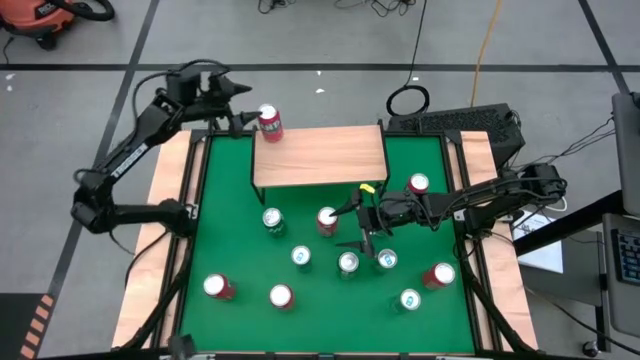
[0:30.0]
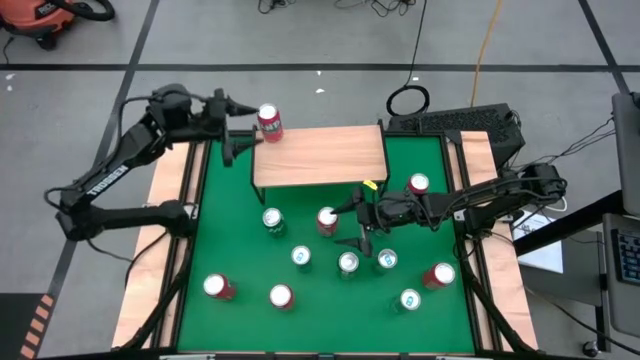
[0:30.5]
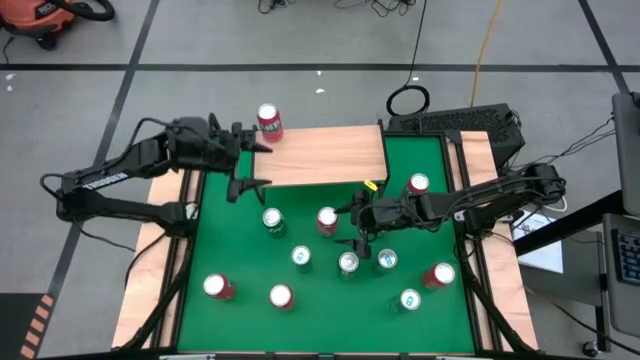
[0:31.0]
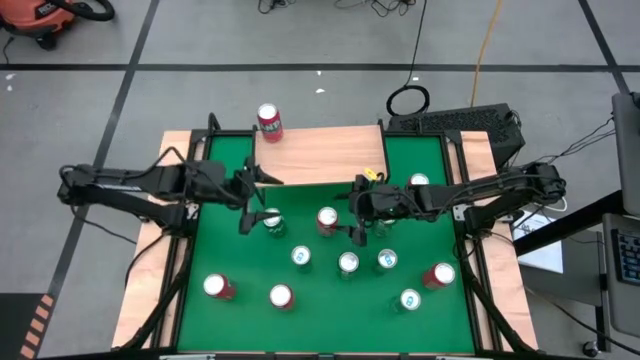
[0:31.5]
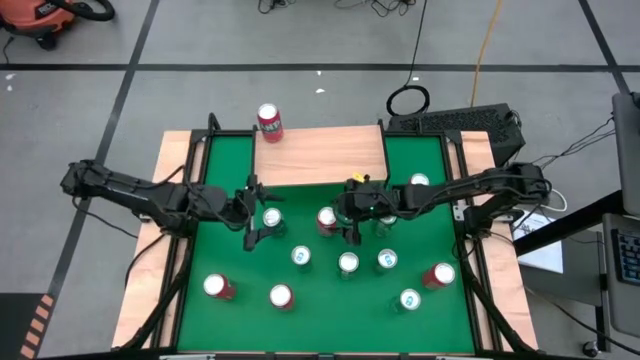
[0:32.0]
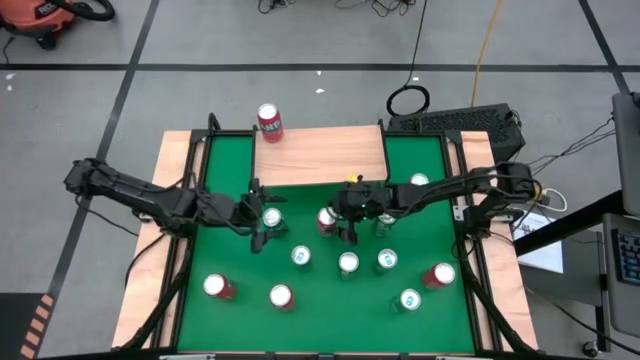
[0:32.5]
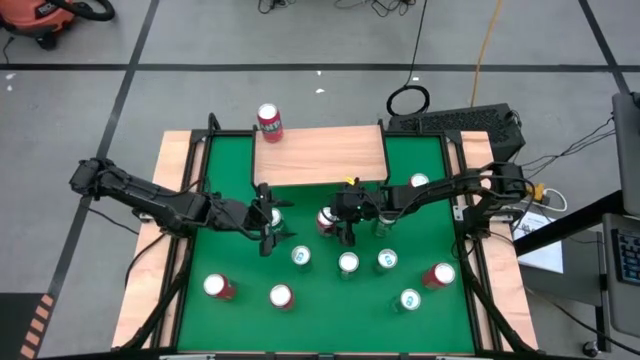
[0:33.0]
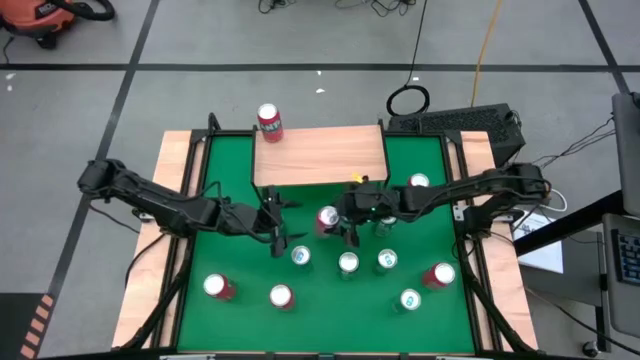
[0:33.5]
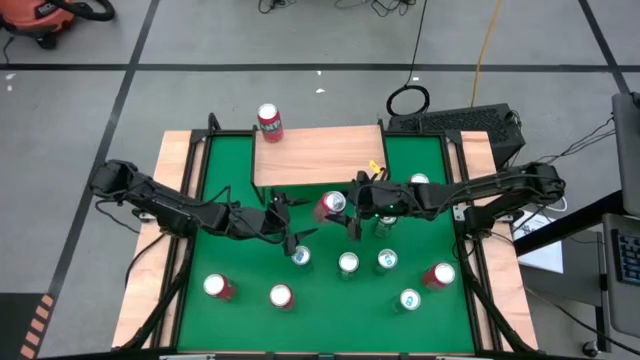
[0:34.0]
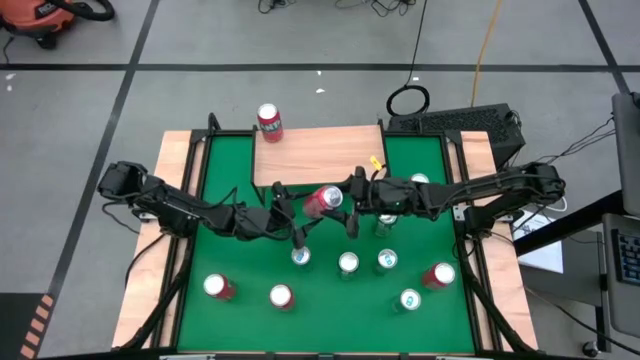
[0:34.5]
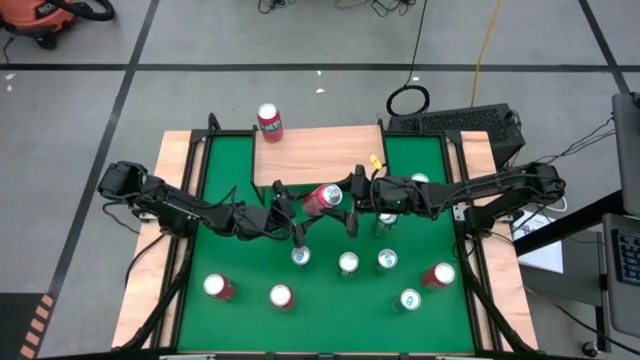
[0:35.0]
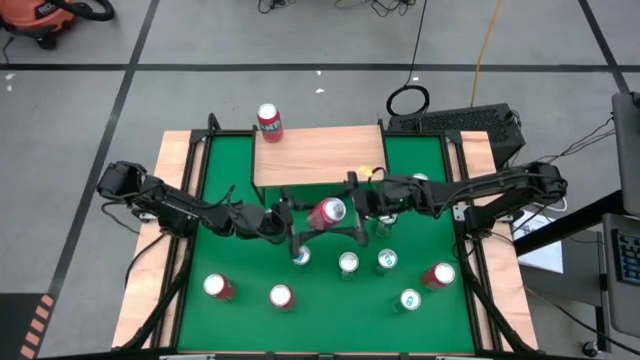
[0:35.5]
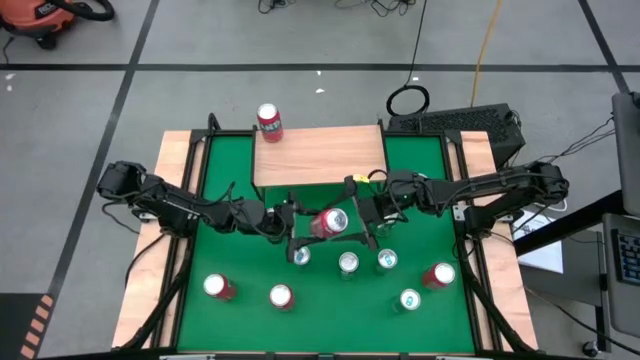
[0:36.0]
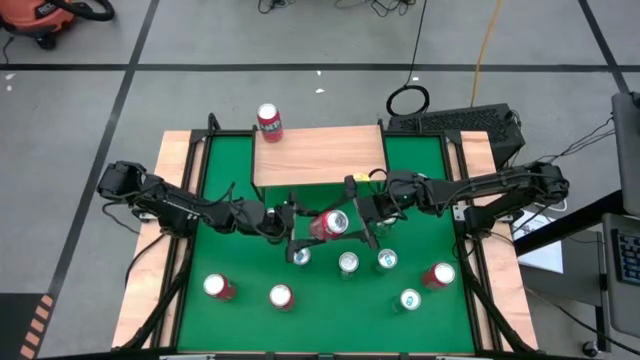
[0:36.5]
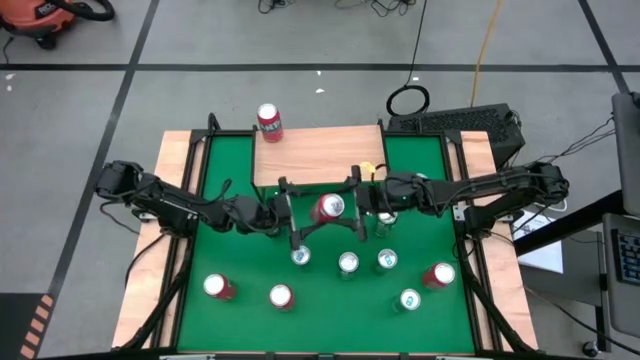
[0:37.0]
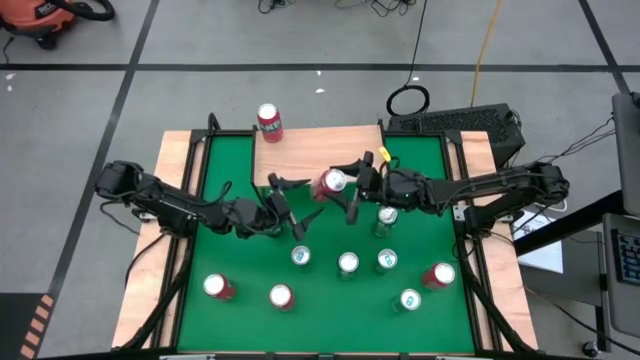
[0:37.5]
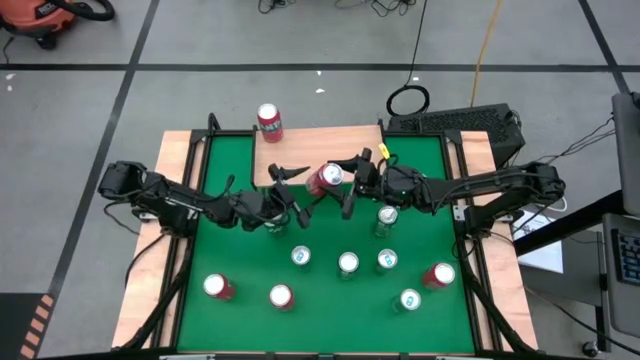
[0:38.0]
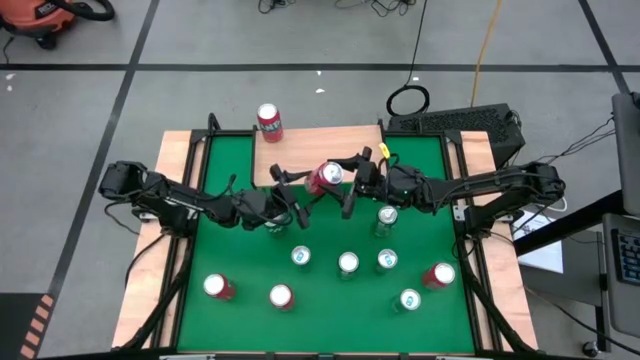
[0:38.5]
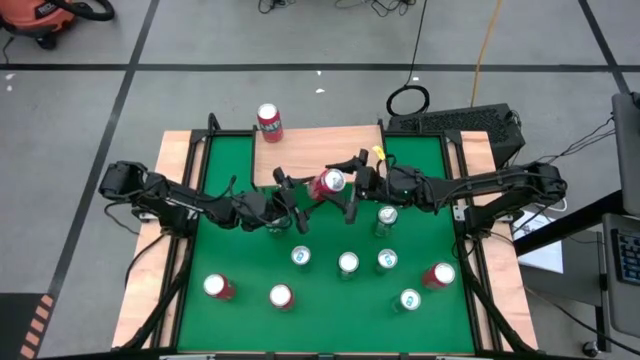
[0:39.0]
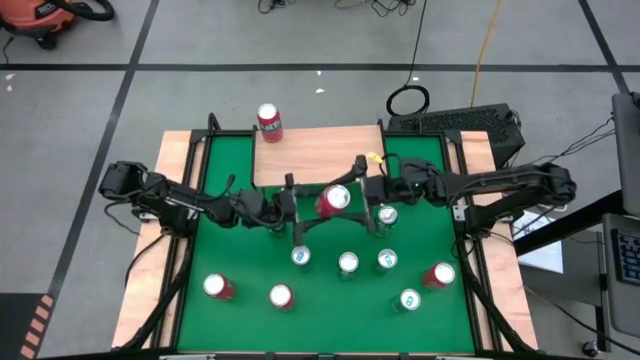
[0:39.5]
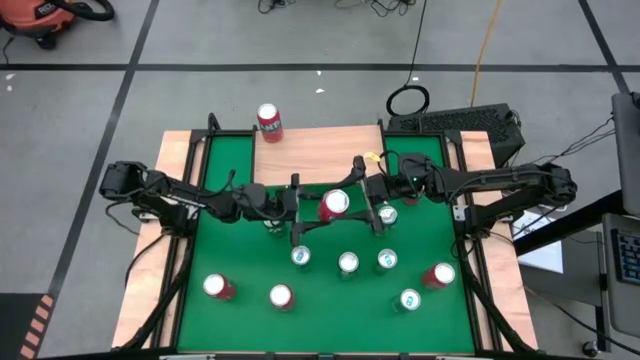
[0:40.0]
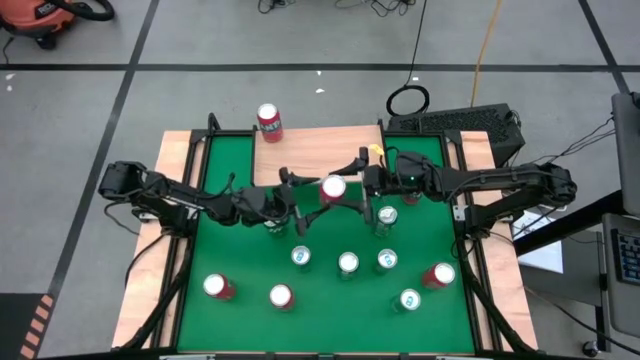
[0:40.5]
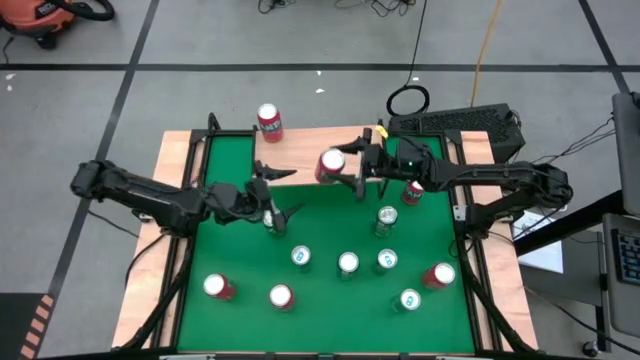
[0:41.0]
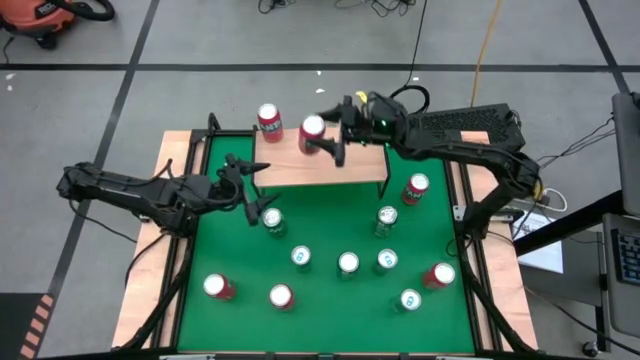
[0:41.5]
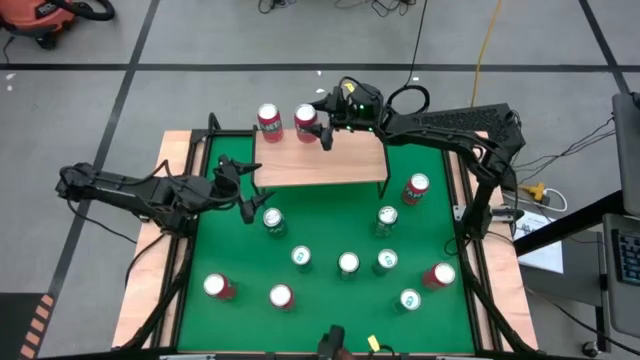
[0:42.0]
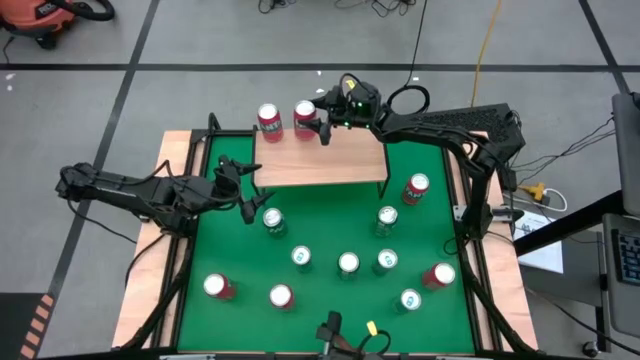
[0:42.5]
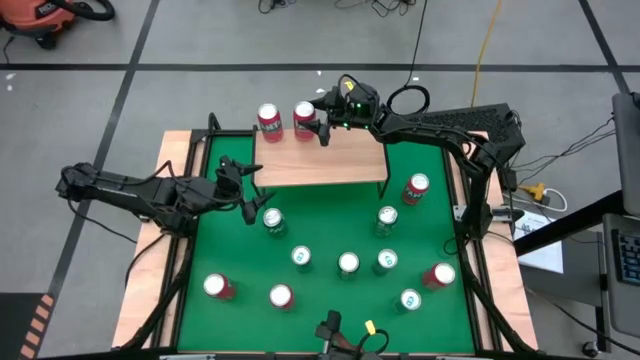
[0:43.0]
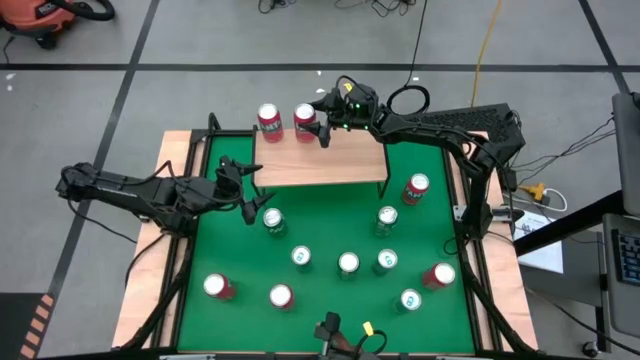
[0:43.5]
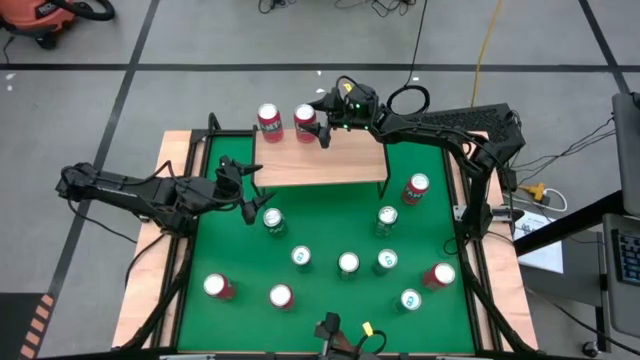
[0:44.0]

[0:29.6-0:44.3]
Task: Place canned beverage on shelf
Put the red soda can on the shelf

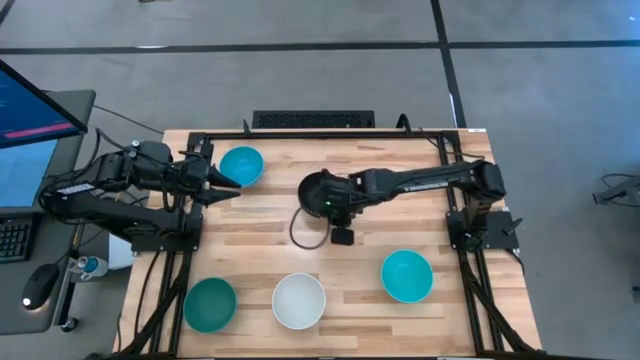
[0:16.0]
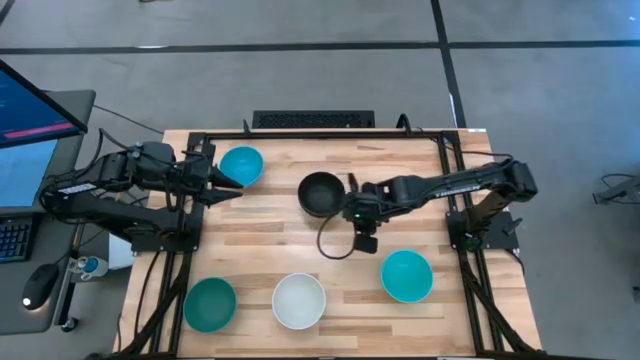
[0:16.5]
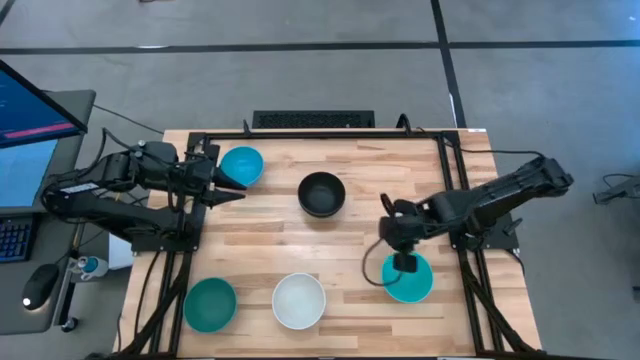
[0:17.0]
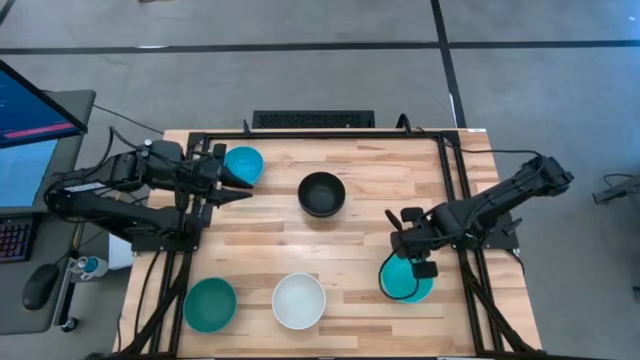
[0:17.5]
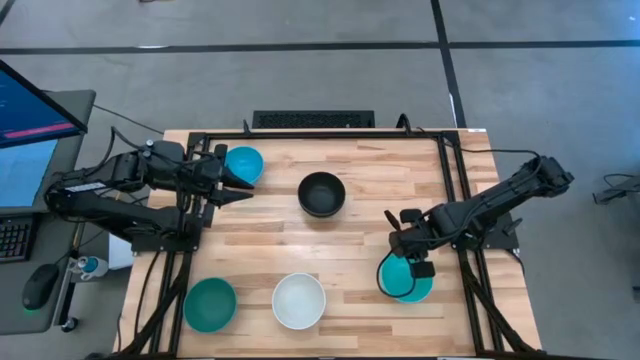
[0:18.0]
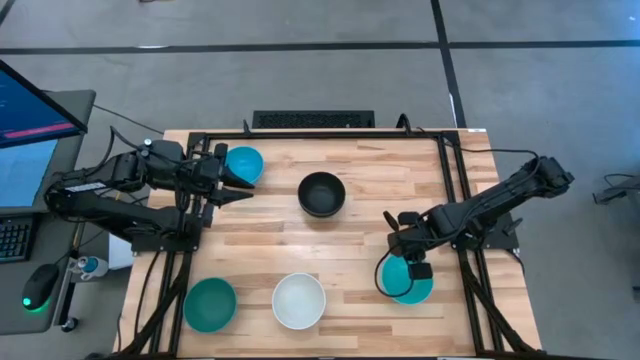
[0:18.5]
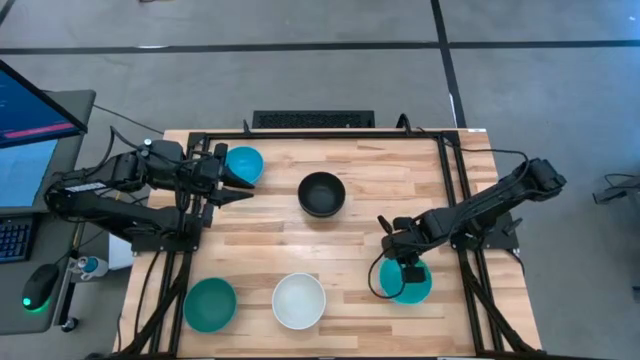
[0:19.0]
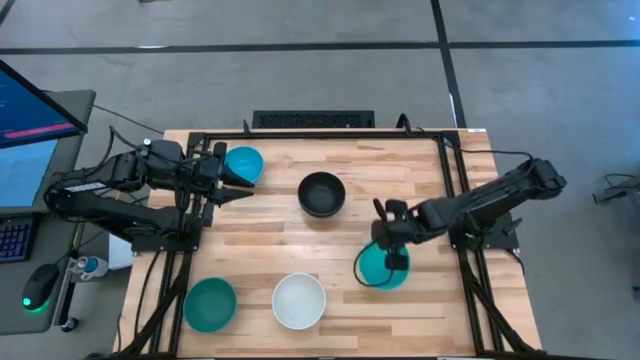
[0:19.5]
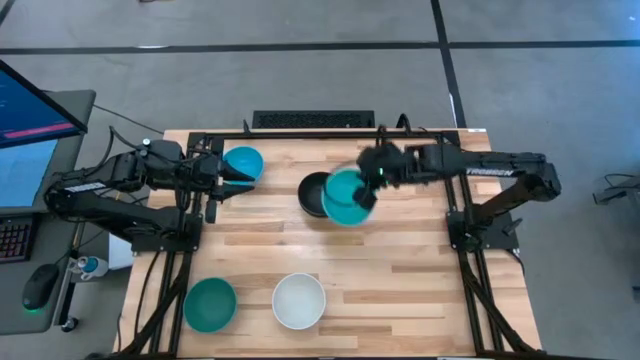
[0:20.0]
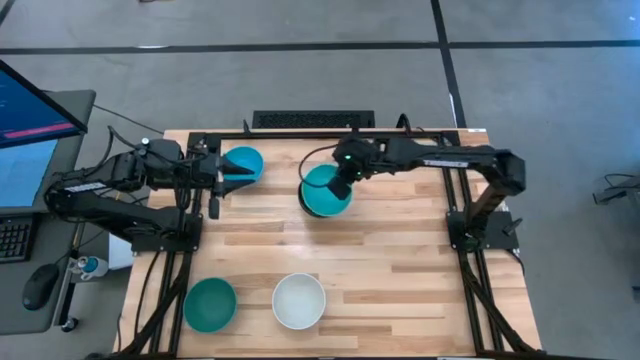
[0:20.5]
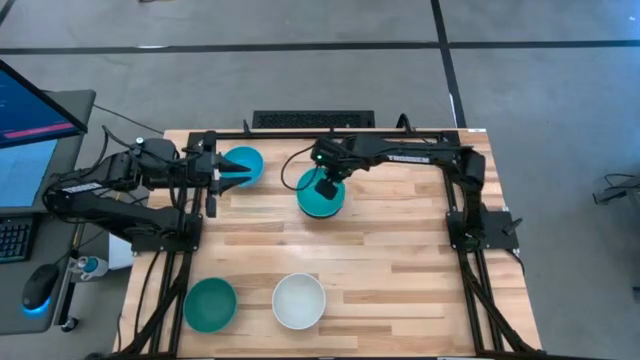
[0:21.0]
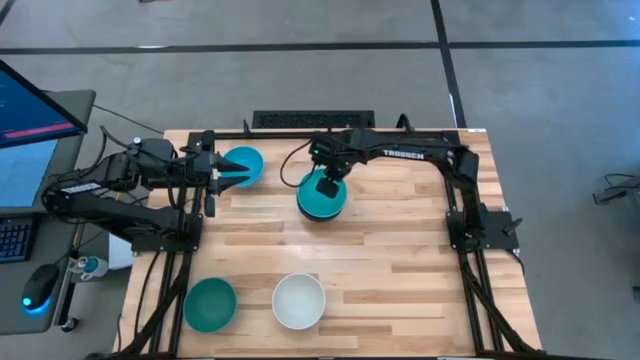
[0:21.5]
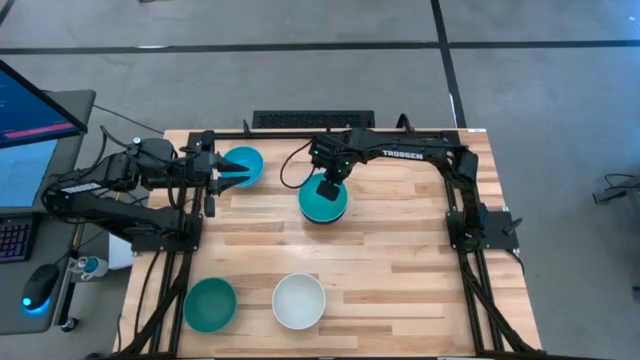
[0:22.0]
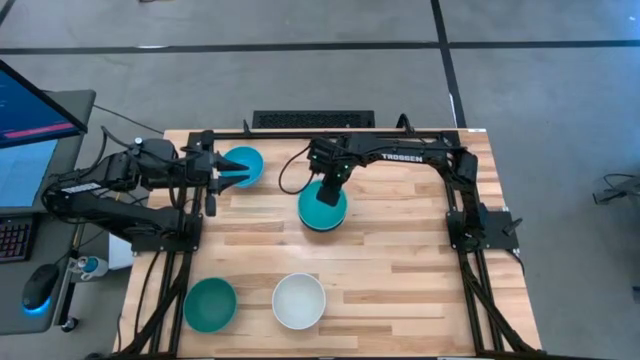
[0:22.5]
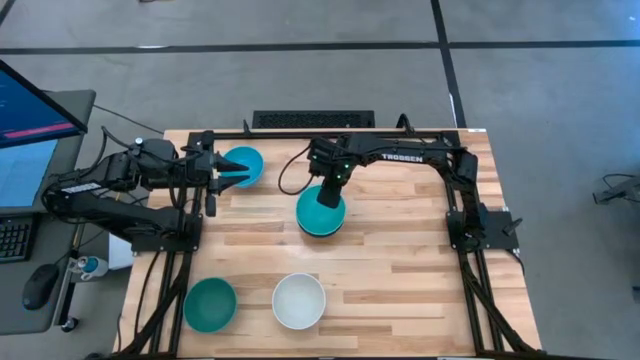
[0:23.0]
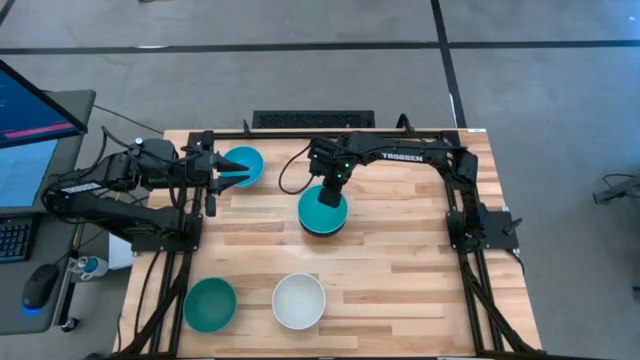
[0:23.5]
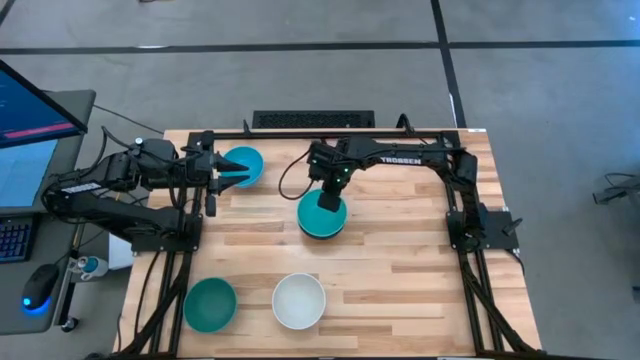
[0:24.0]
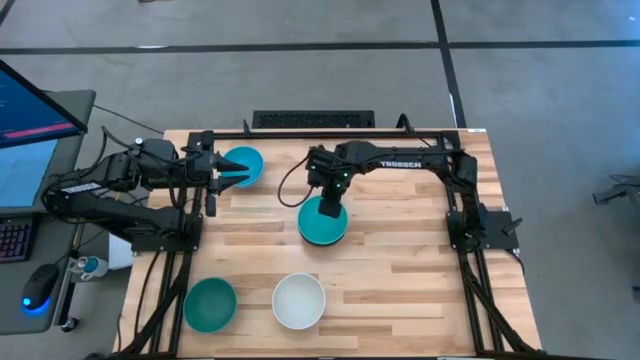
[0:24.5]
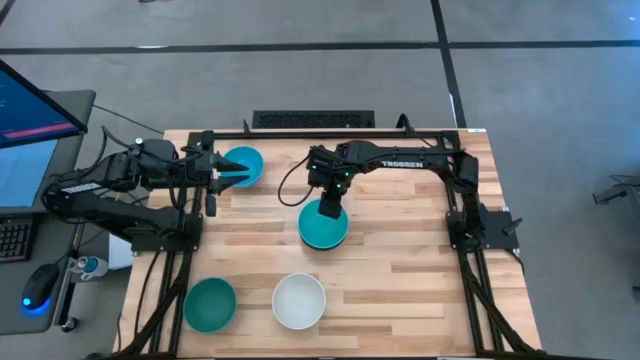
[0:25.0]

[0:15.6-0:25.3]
Task: Nest bowls inside each other
Stack the light blue bowl on top of the black bowl
